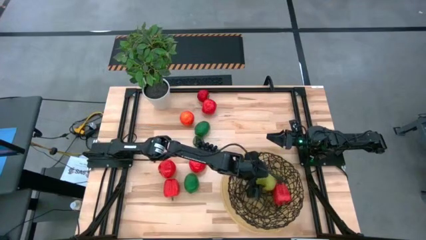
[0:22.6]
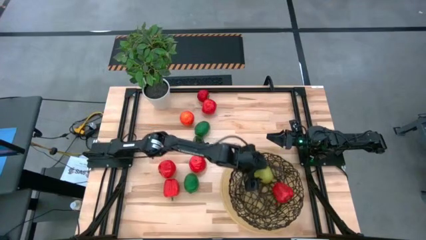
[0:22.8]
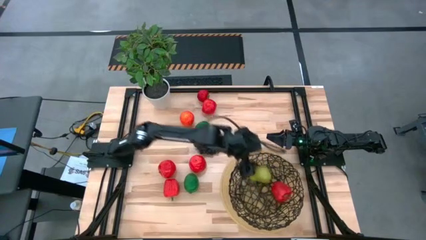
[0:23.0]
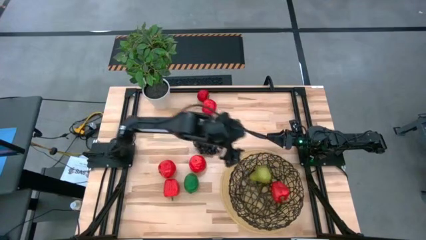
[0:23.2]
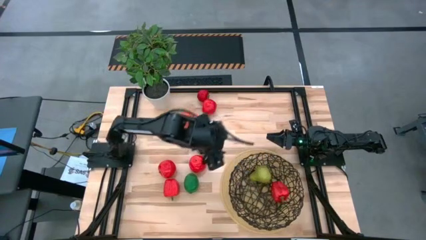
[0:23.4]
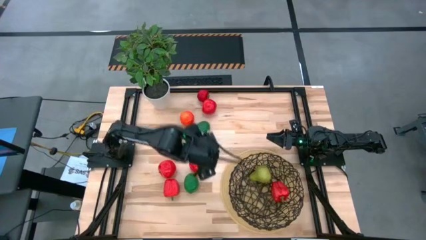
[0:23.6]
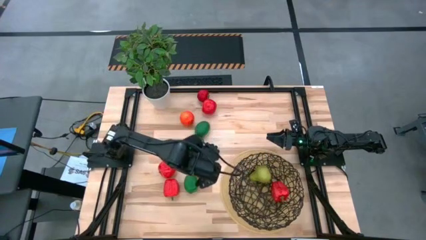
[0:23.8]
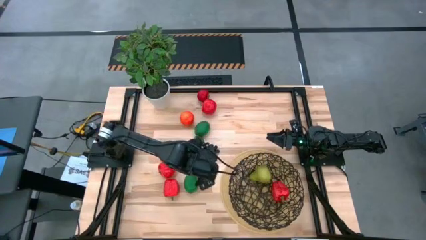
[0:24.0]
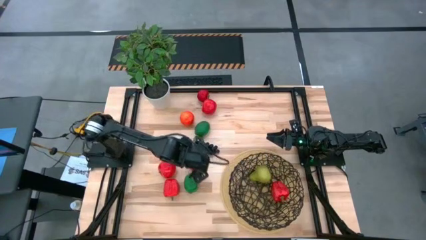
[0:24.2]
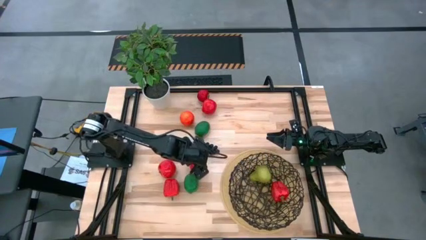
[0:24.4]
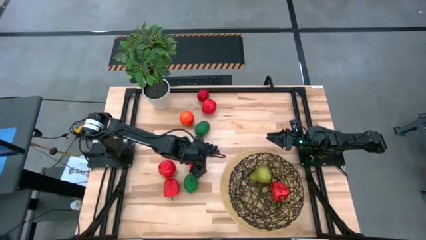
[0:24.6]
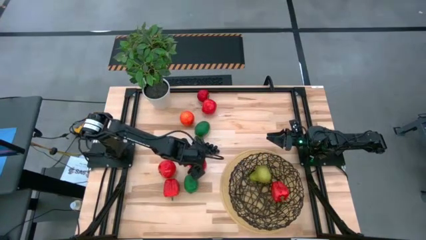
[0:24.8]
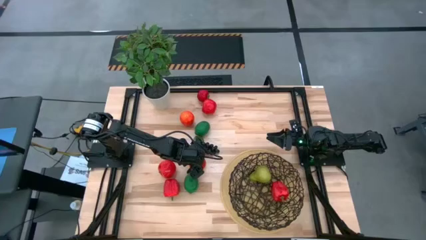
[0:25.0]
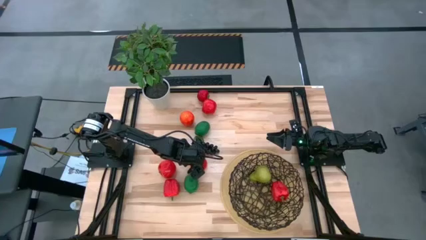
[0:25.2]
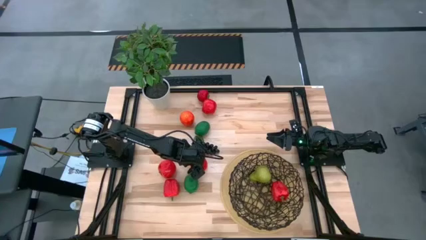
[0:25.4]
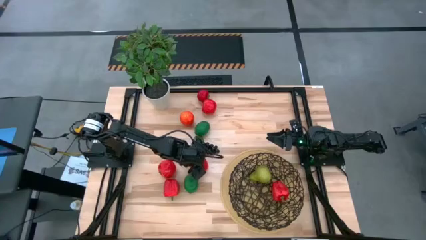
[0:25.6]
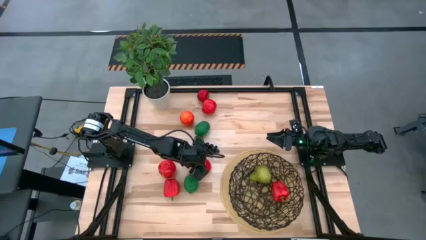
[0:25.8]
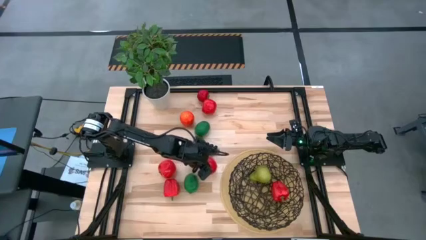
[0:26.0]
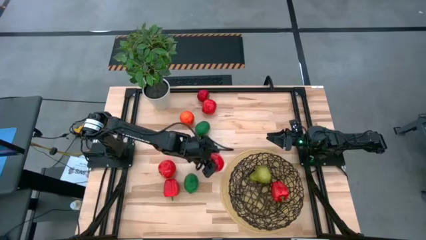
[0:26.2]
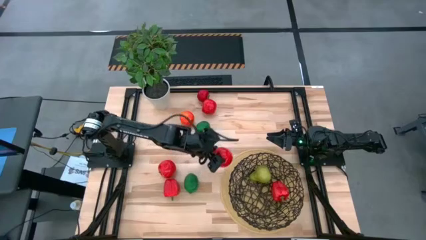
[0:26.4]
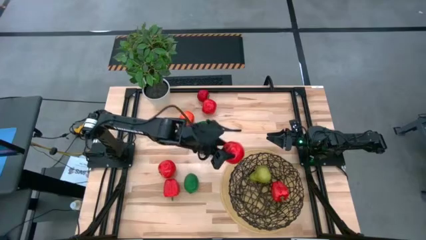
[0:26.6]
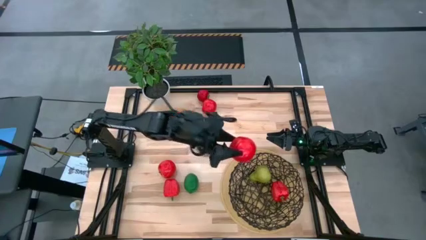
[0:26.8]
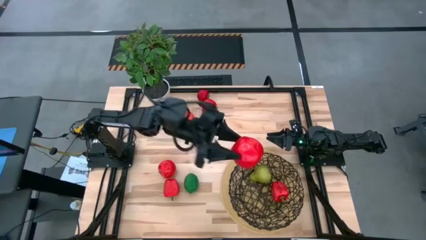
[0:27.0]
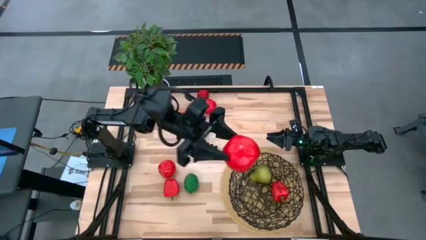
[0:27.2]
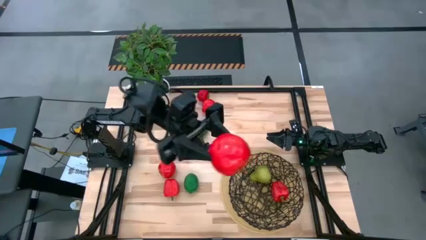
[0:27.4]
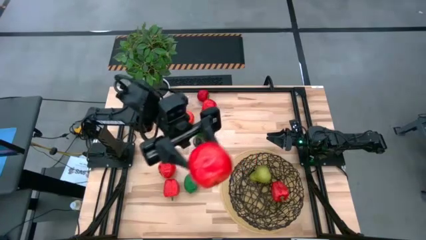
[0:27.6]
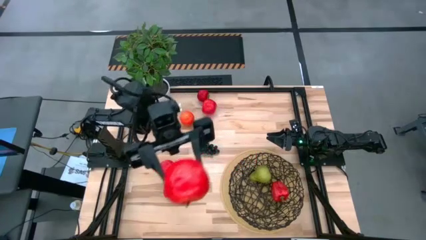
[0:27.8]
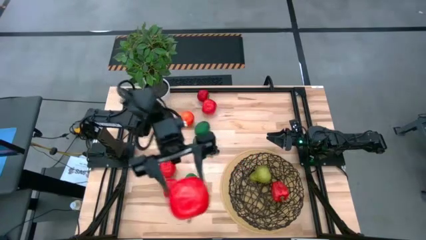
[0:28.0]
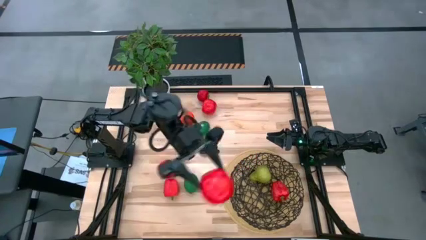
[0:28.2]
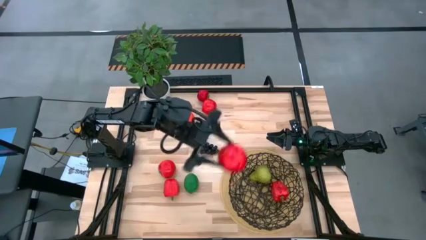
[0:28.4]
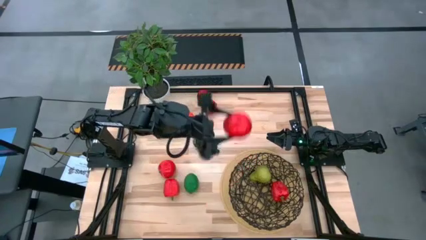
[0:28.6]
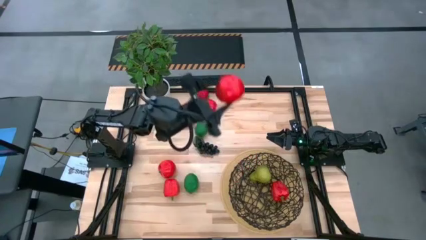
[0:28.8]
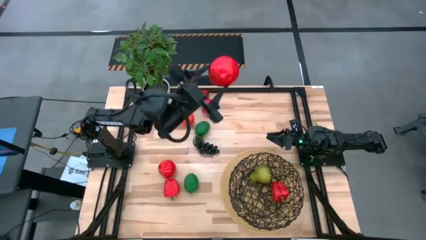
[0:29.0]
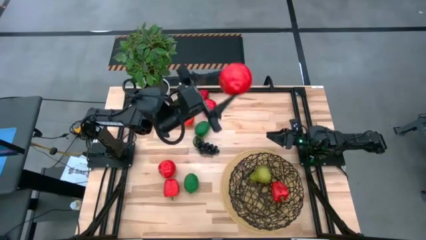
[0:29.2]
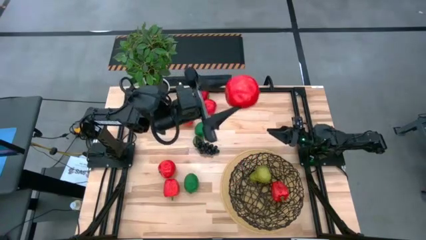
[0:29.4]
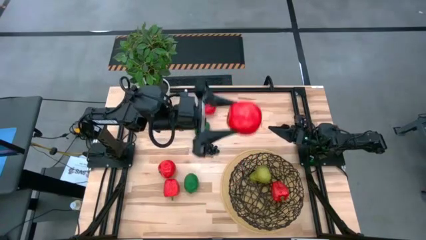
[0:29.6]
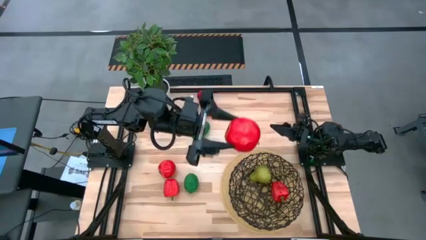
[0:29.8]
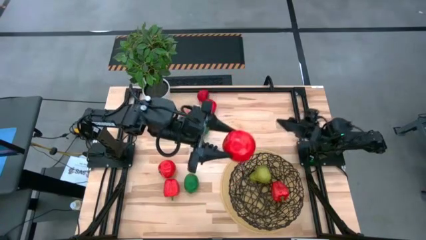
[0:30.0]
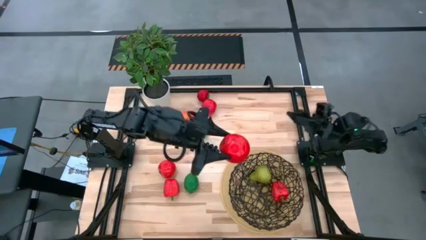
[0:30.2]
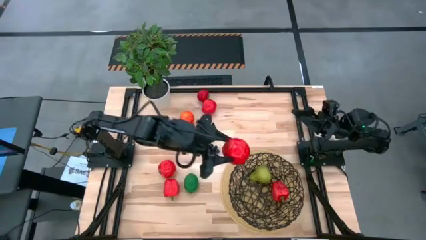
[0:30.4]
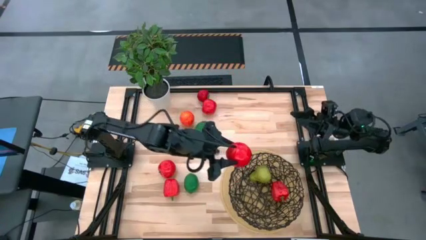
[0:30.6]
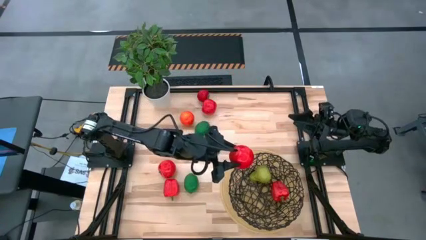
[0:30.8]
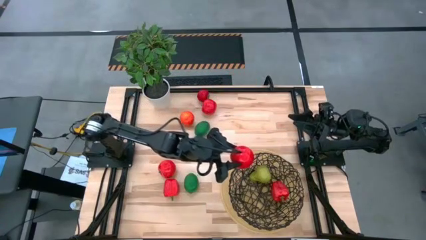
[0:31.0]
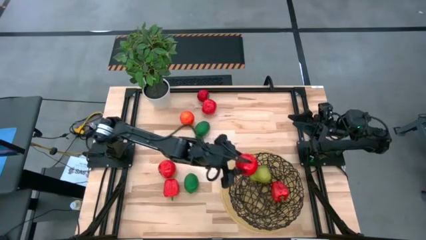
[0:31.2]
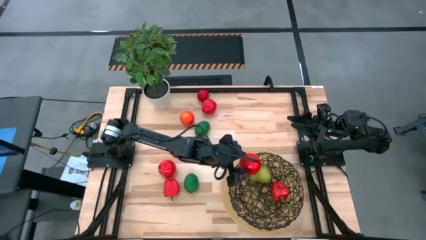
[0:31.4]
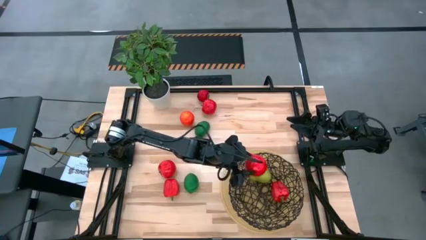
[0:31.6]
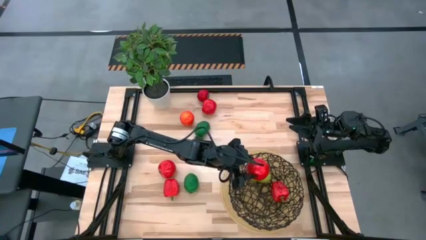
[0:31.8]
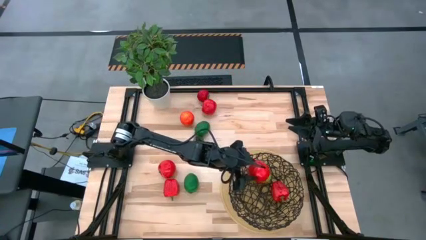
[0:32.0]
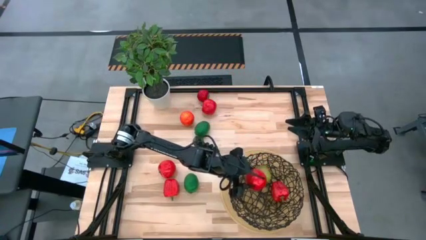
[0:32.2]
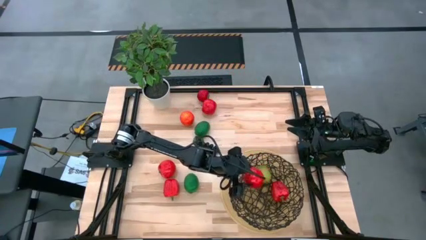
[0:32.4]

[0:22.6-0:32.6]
Task: Build produce basket
Put the bottom right red apple into the black wire basket

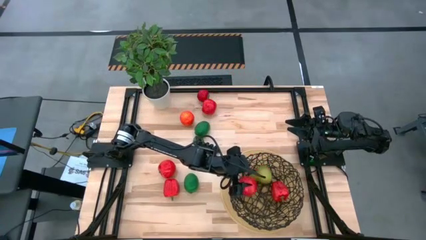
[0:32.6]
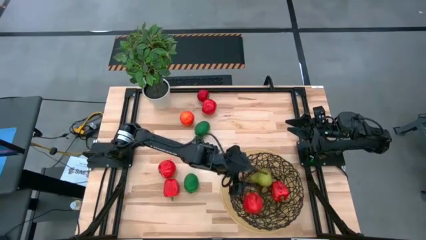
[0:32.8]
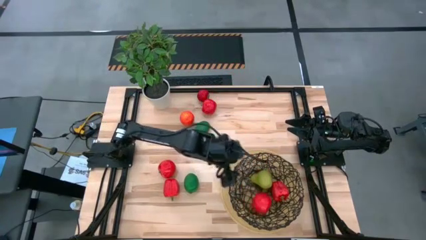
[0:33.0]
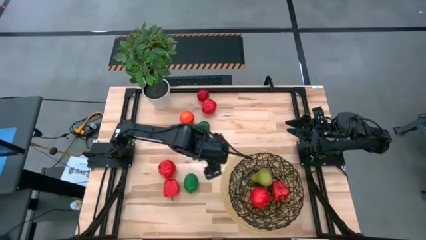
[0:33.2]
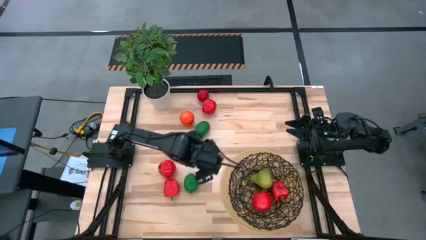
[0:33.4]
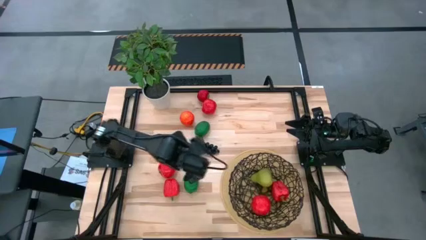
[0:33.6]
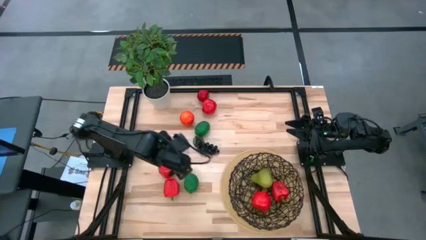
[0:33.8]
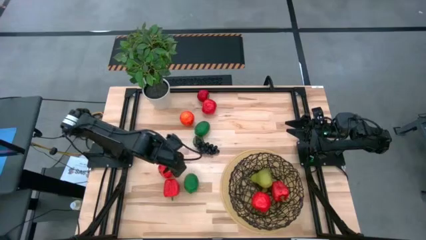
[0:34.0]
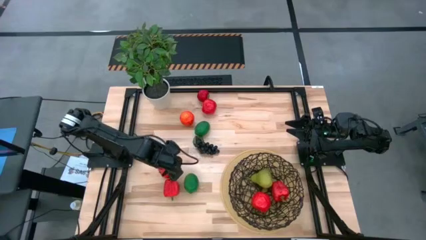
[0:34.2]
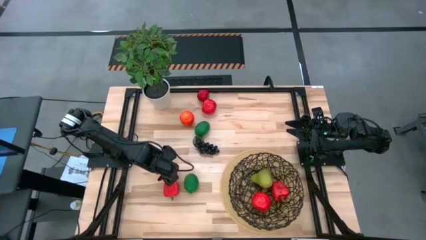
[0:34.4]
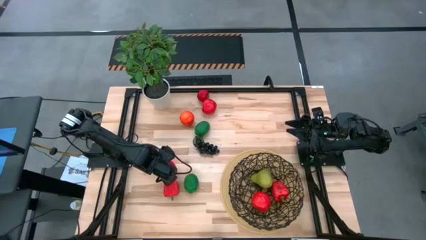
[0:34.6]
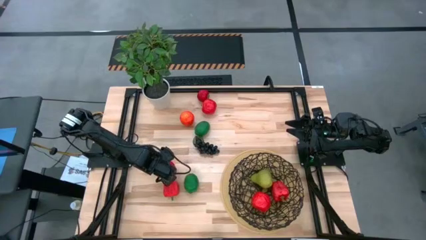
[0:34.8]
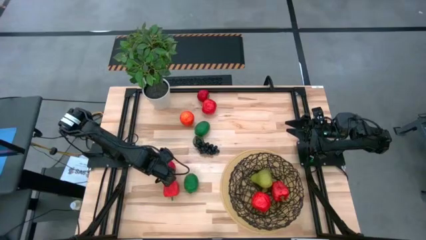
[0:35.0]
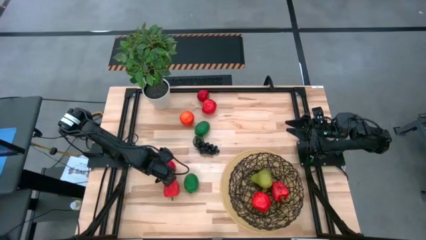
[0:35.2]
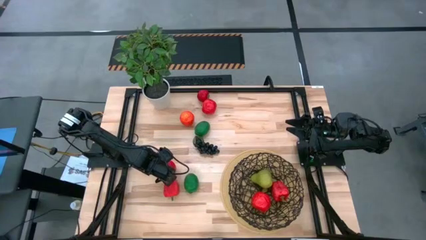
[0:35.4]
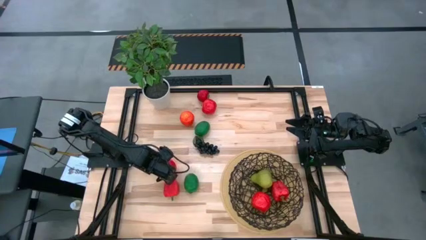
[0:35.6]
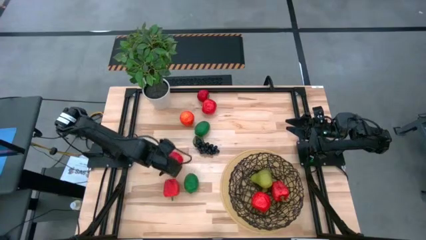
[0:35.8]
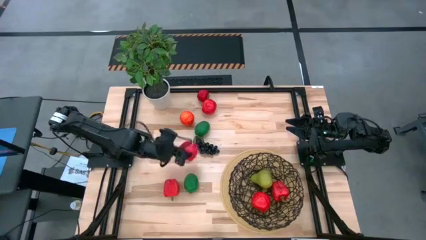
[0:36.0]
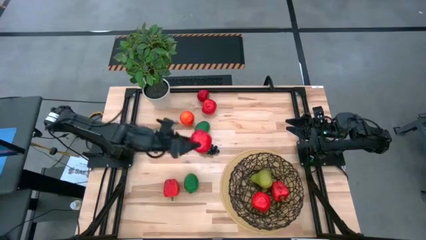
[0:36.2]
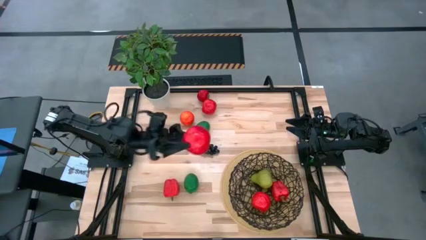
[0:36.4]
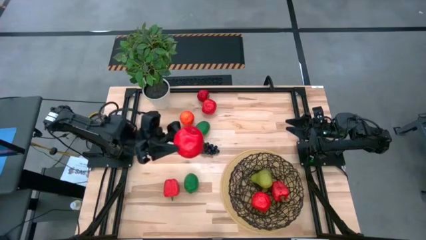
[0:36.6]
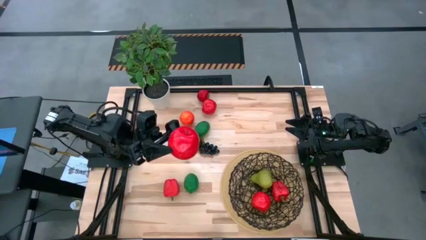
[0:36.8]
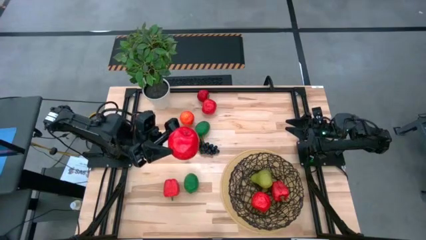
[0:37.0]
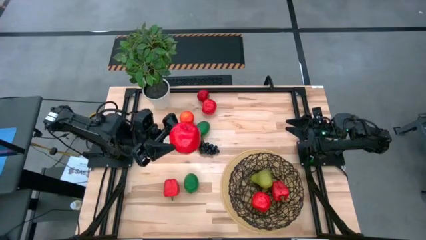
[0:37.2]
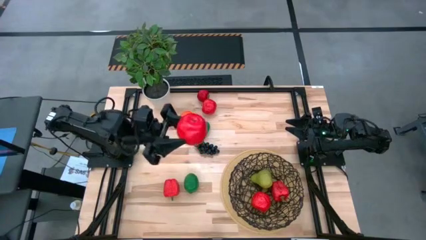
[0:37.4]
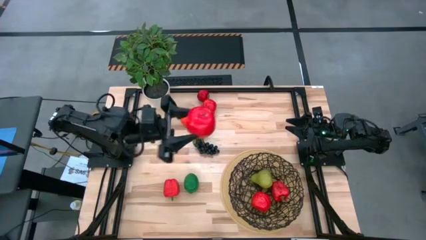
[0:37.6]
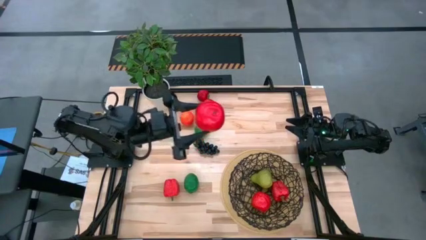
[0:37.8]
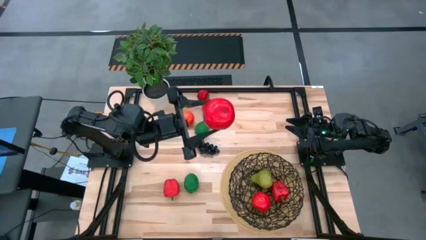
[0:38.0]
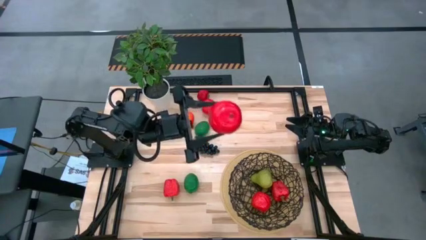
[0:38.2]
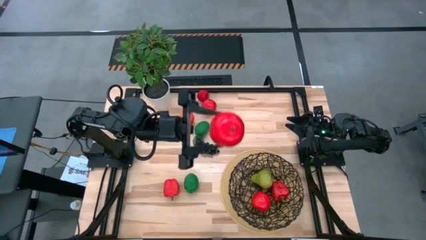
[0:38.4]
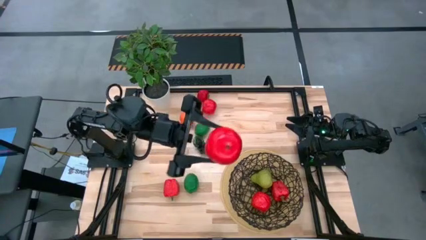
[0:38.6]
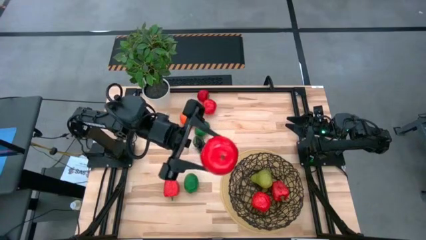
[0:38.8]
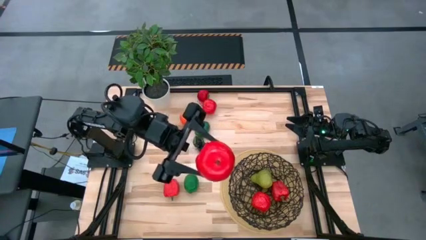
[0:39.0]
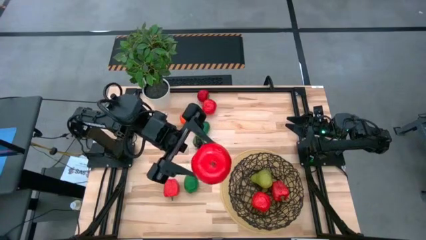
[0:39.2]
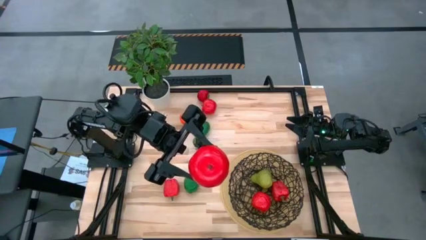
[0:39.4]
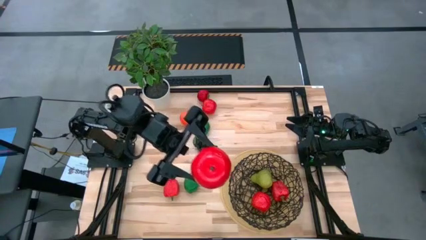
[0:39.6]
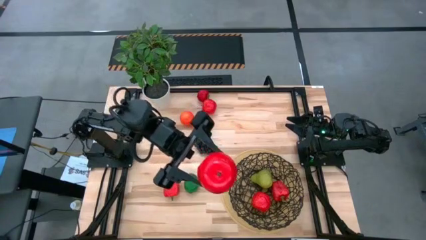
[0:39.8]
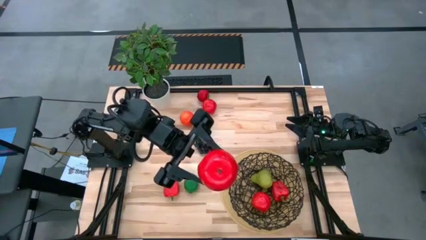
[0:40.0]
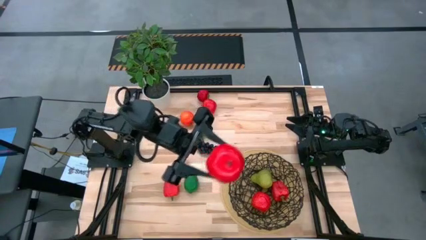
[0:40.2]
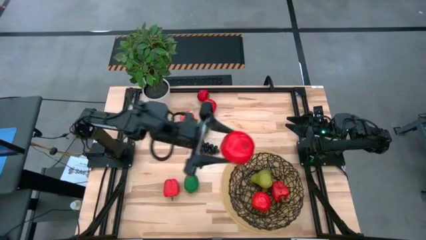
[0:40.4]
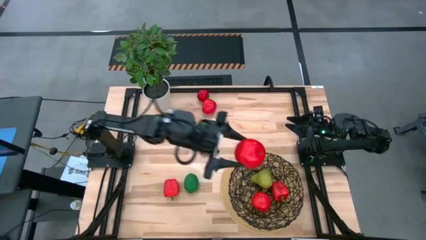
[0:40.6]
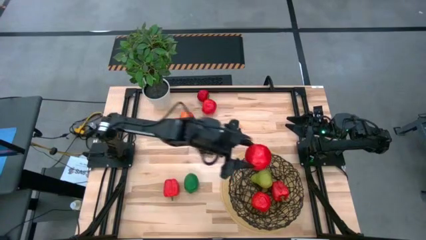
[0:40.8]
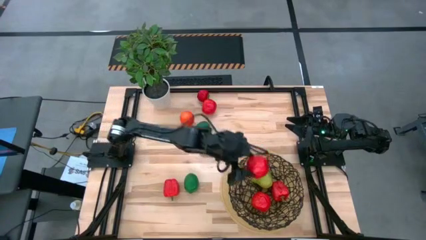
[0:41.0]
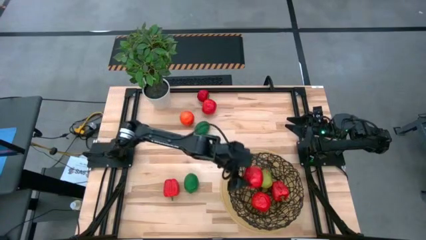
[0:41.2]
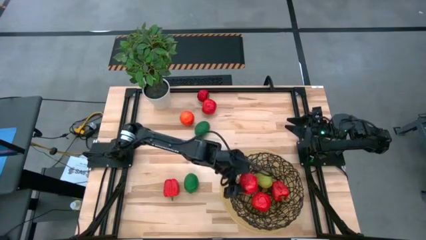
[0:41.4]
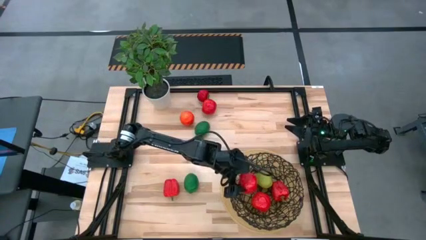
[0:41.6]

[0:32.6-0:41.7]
Put the bottom red apple into the black wire basket
